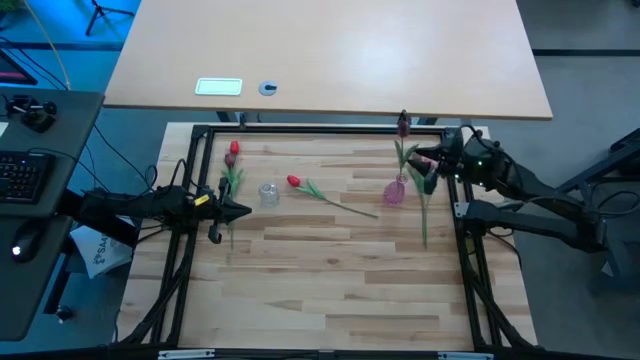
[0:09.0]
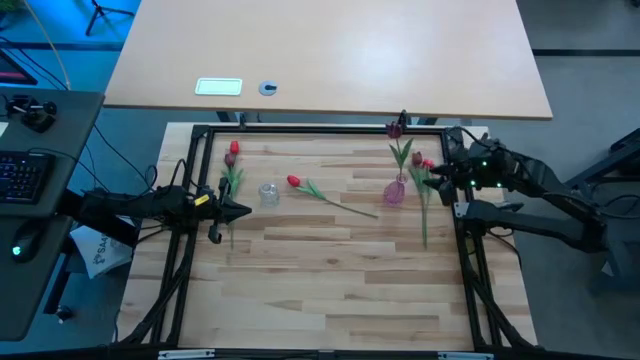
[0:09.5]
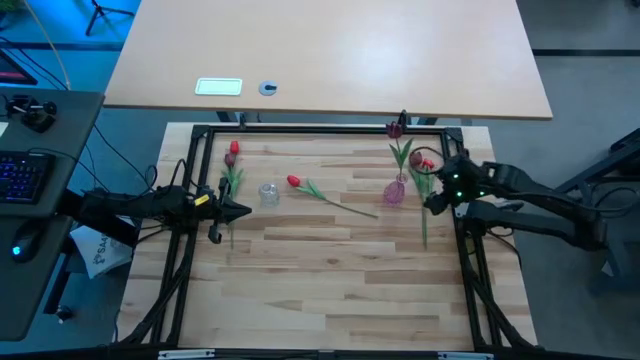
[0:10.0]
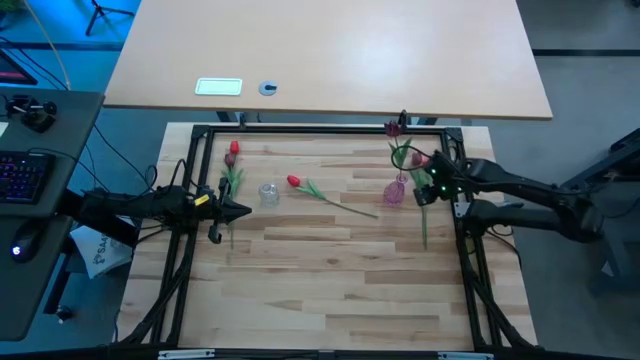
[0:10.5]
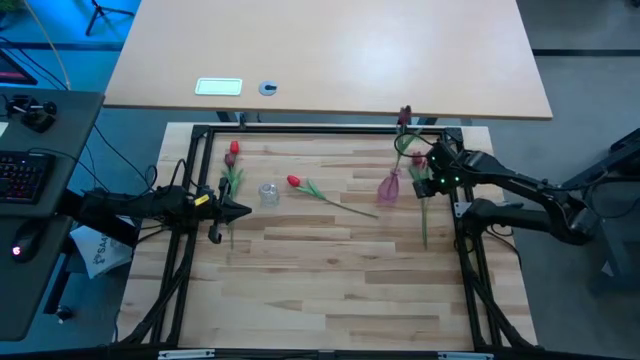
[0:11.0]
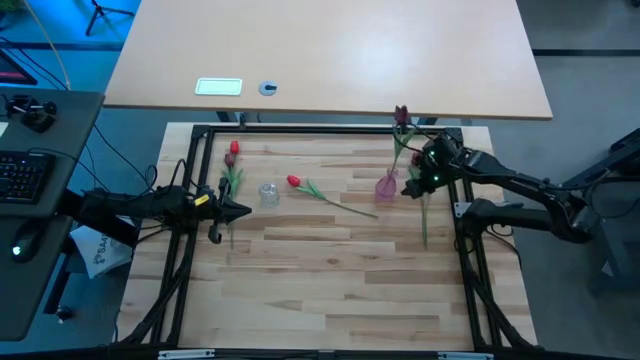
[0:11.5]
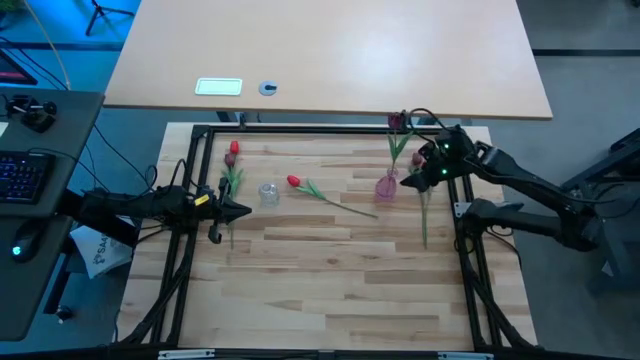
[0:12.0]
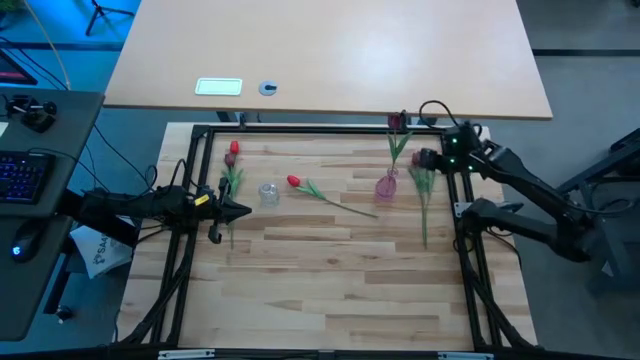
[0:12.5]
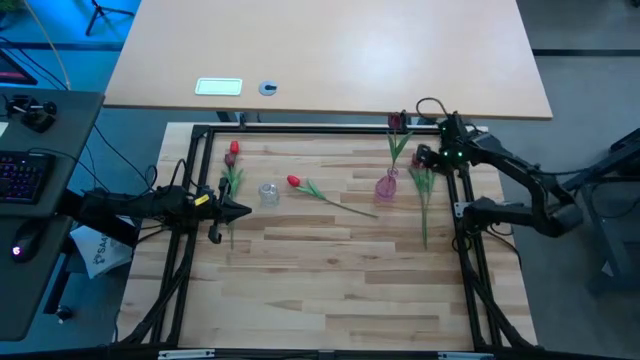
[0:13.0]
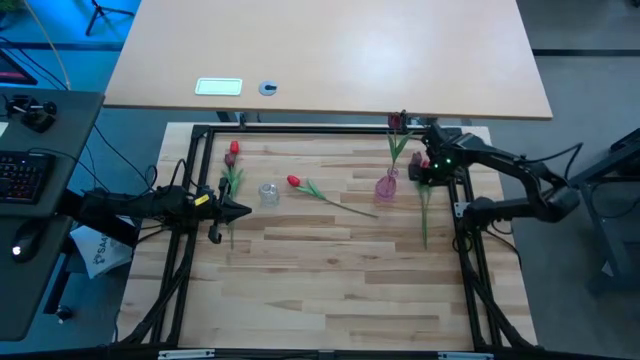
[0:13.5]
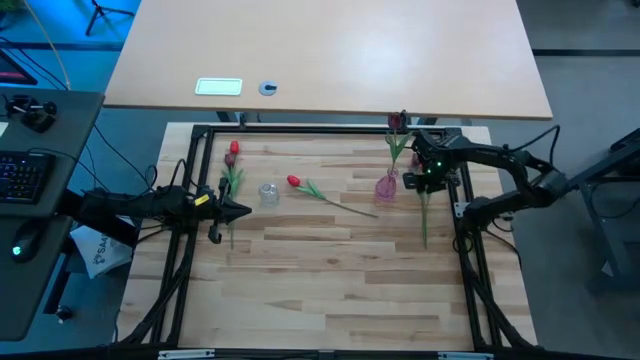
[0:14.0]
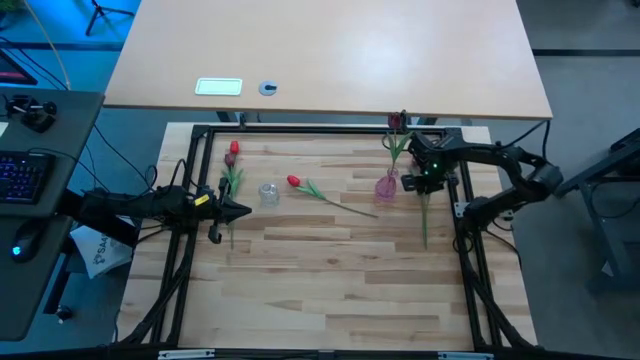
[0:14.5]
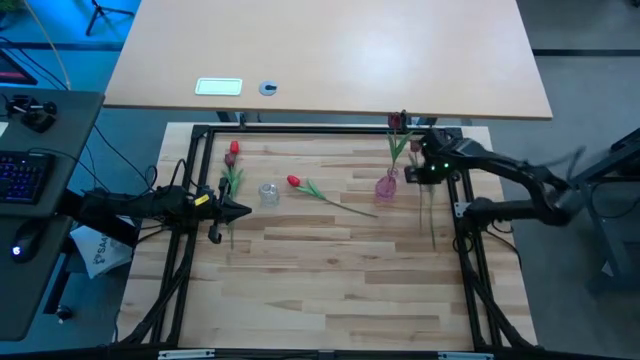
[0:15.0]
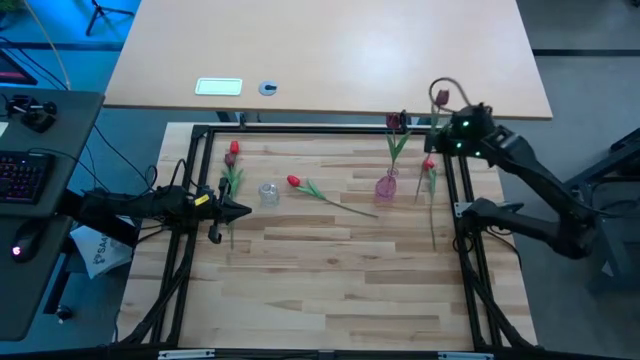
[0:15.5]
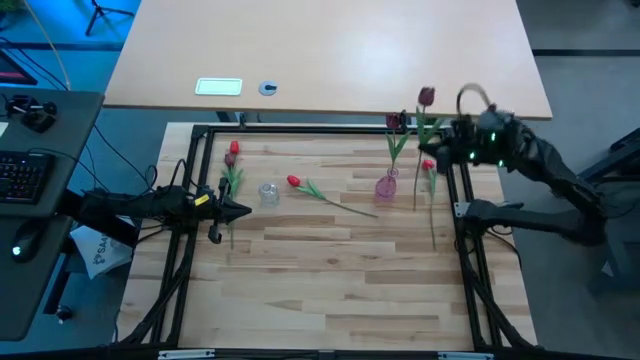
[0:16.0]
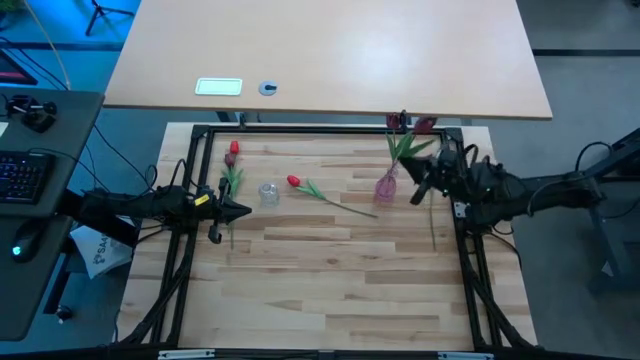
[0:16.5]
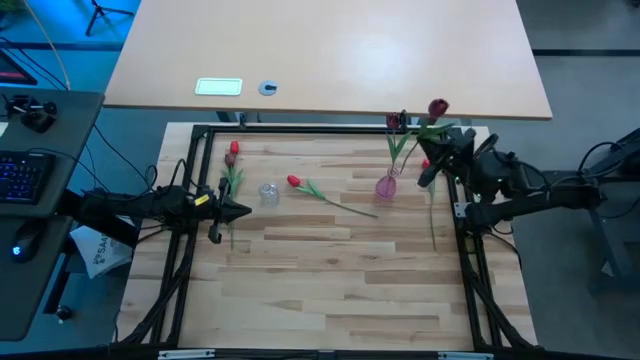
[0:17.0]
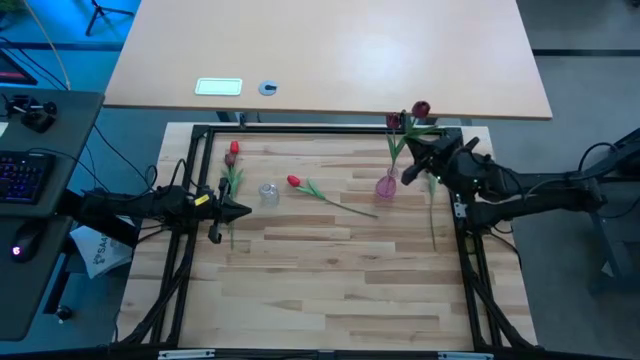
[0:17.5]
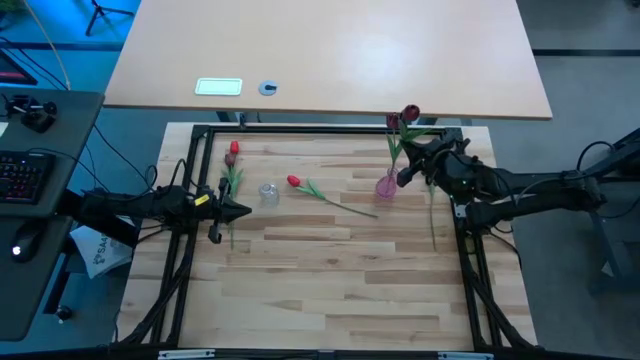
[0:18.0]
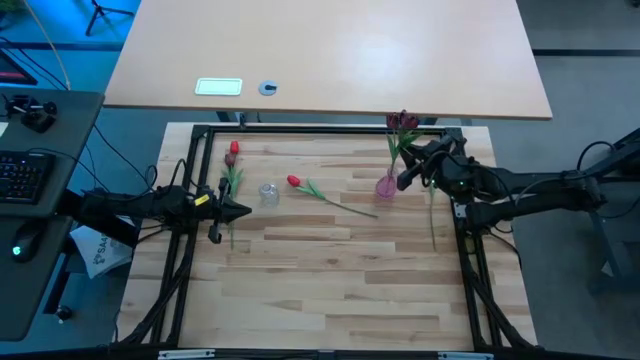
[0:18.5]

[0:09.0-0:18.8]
Task: Sort flowers into vase by color
Put the right dark red tulip into the purple vase

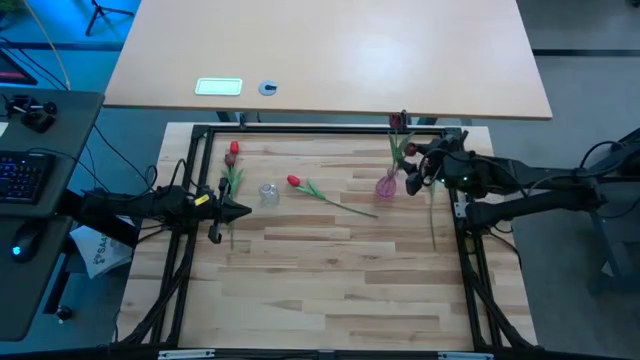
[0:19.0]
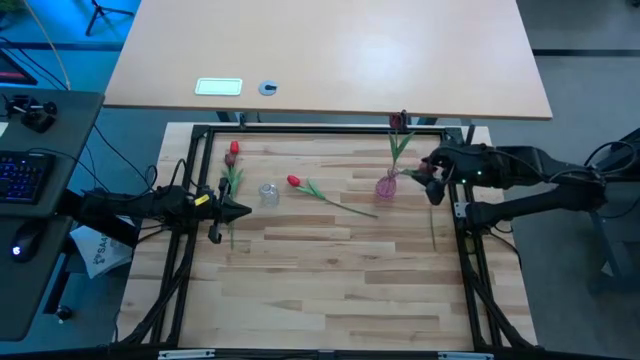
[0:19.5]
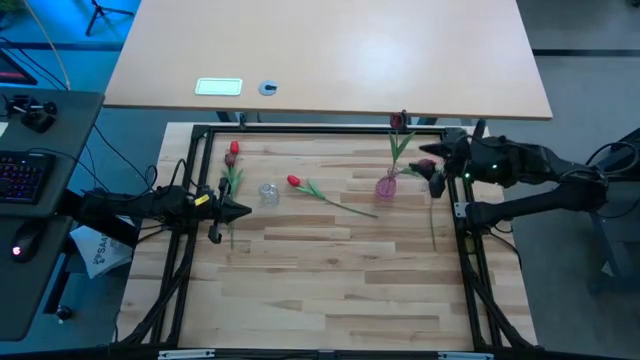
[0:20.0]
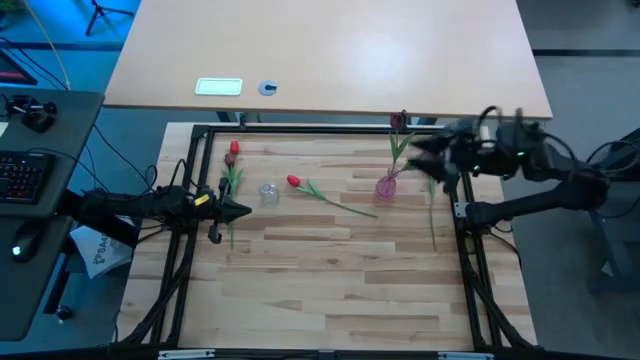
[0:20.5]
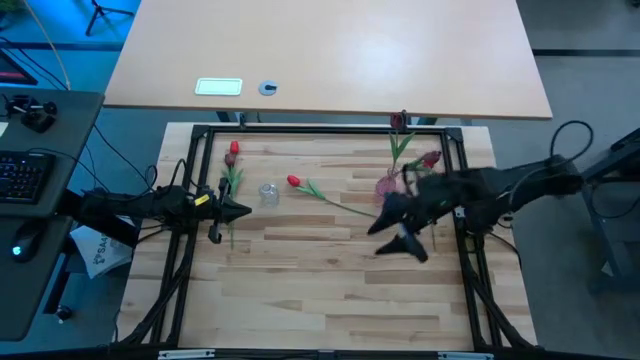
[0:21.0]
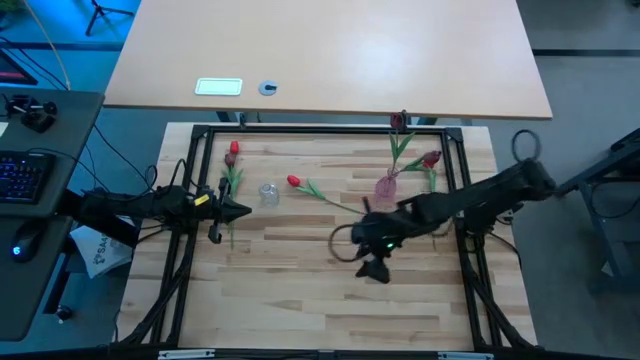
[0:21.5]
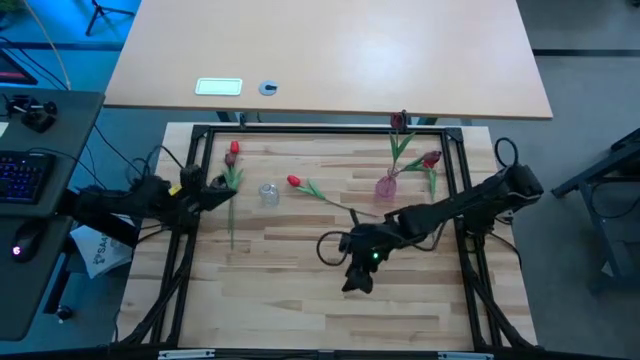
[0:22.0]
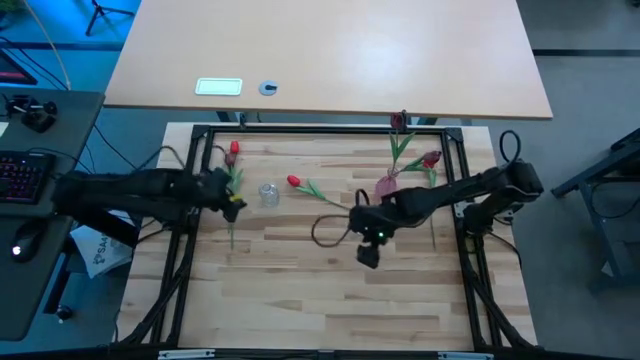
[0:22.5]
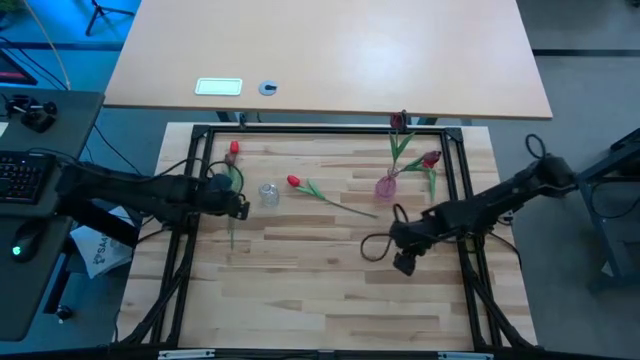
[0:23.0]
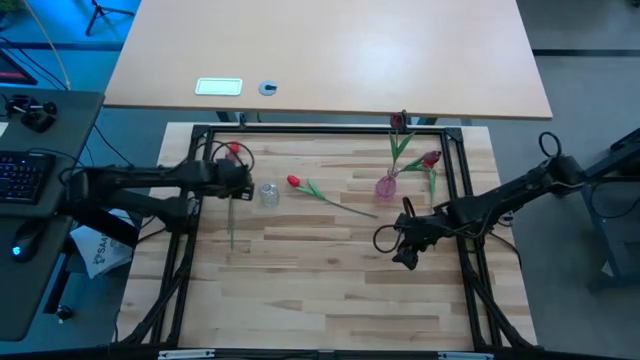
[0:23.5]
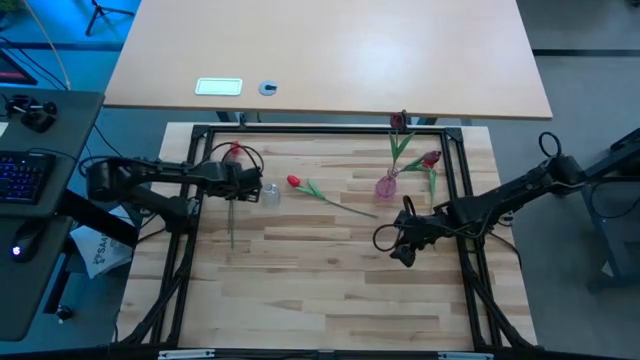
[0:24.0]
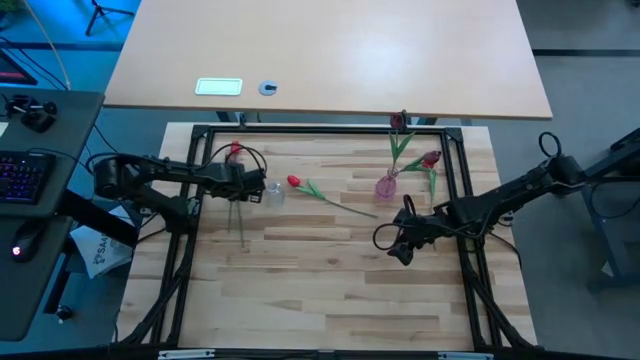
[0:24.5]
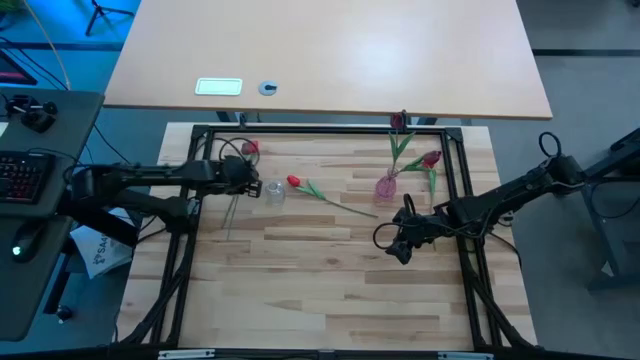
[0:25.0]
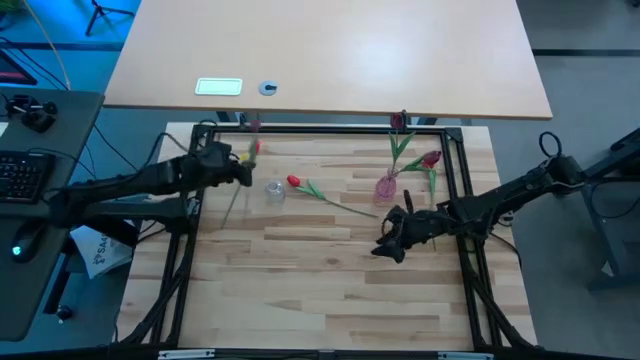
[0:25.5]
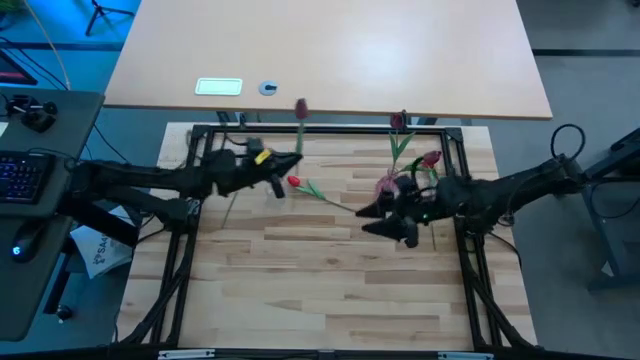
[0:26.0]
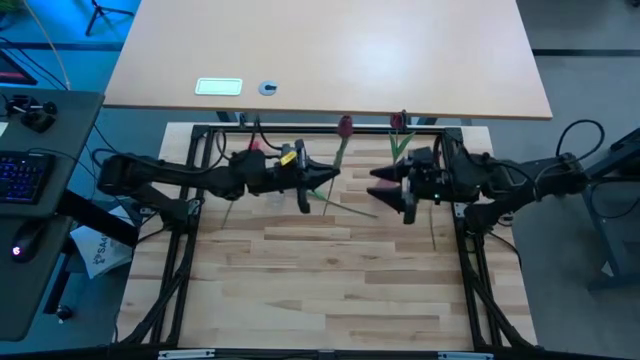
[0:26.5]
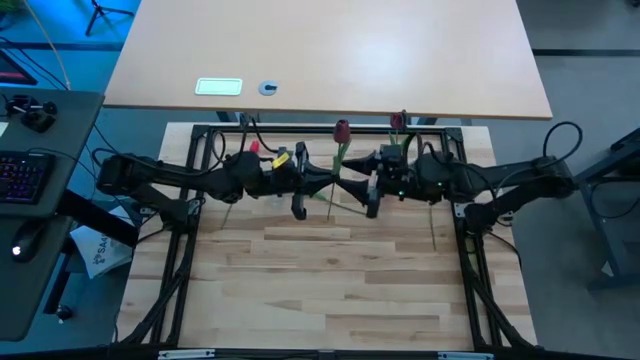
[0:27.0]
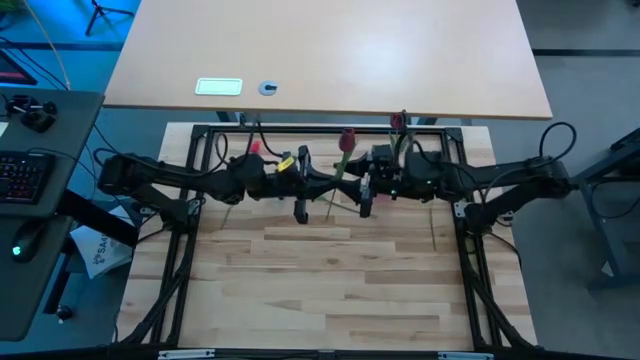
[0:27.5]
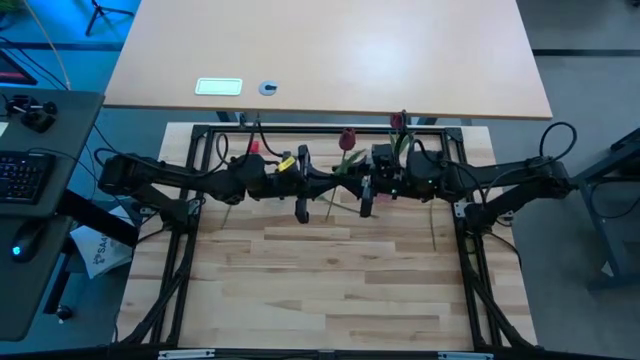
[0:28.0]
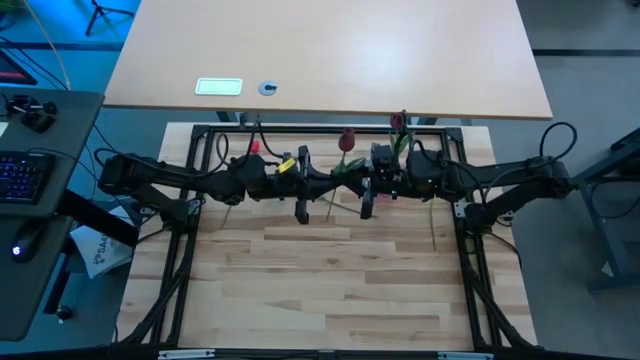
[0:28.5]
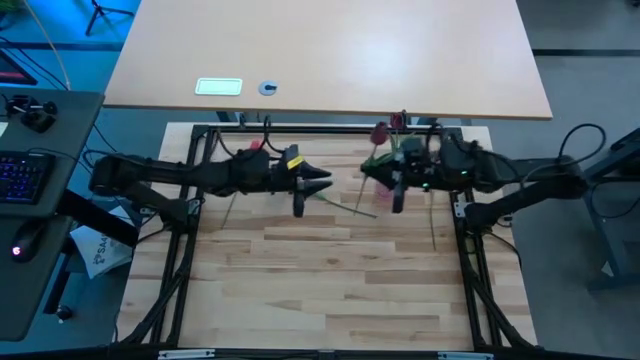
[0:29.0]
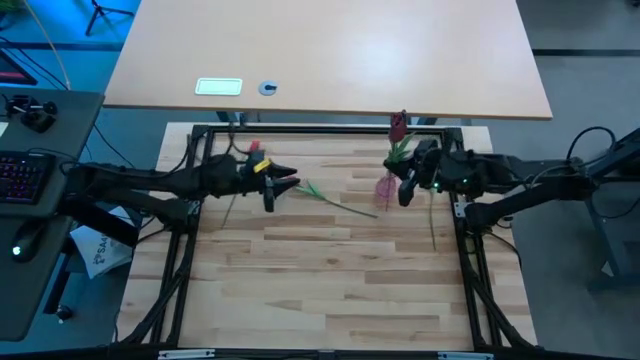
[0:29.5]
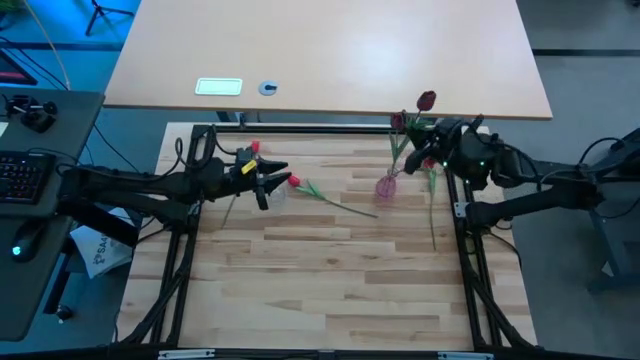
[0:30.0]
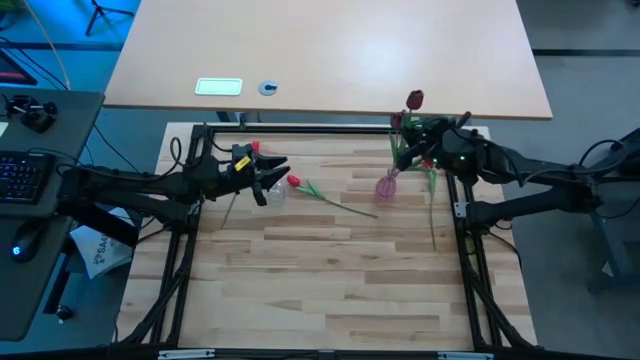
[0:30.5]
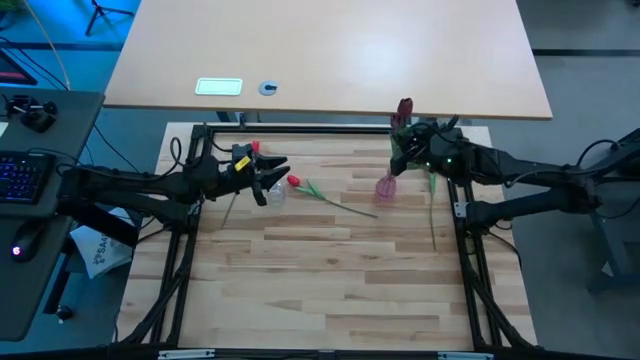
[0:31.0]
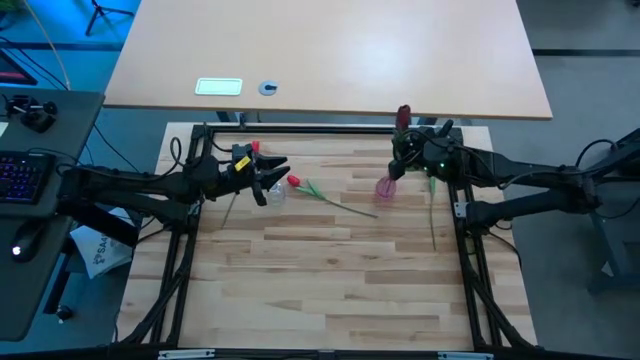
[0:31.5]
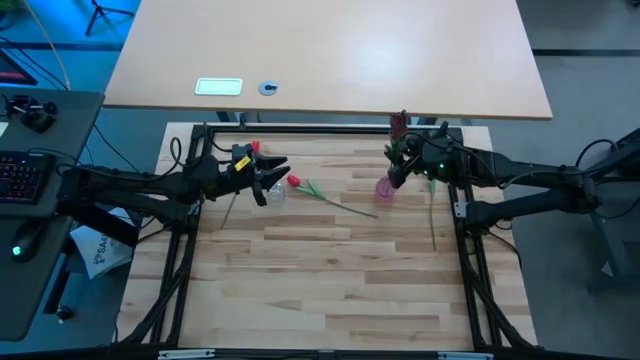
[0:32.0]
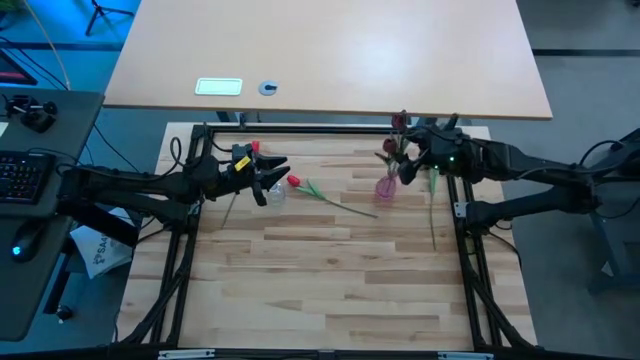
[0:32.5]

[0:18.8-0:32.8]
Put the dark red tulip into the purple vase
